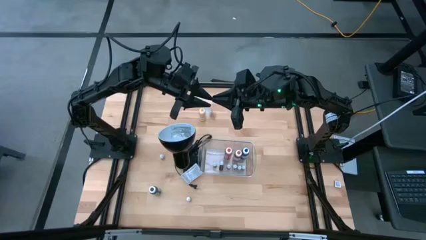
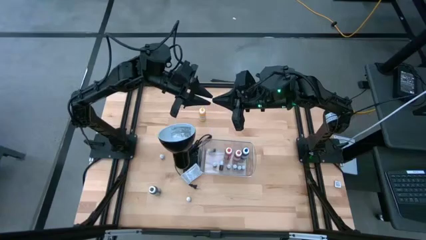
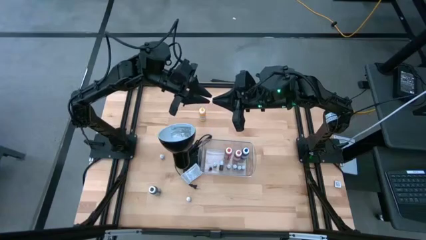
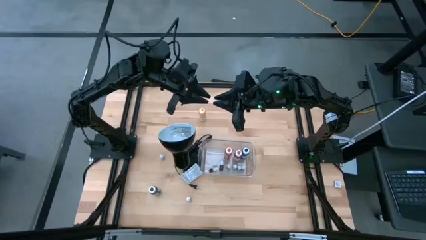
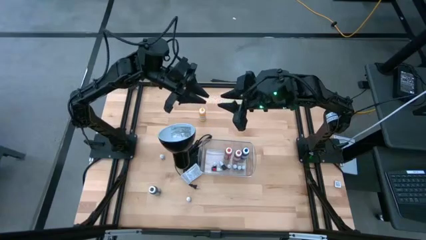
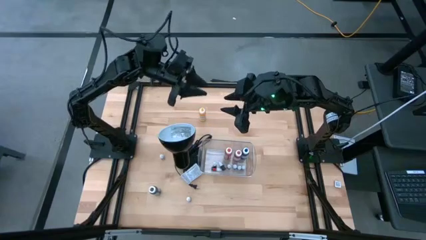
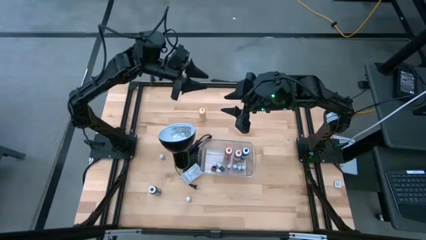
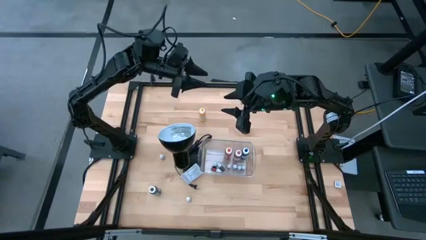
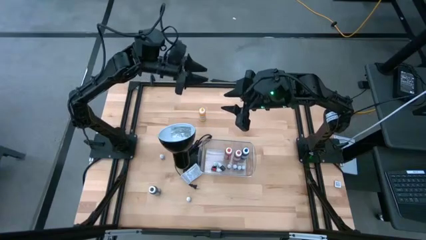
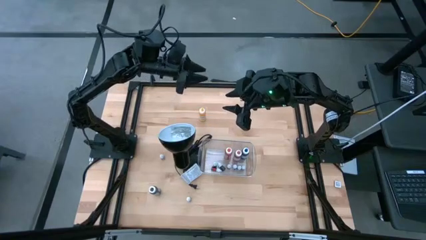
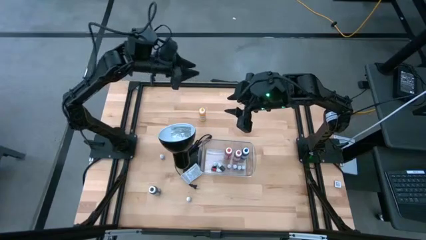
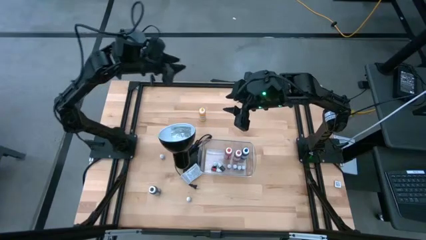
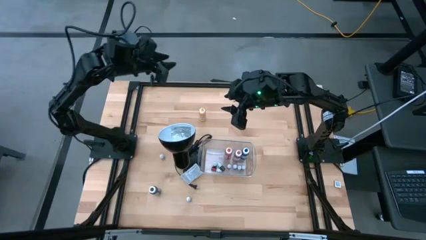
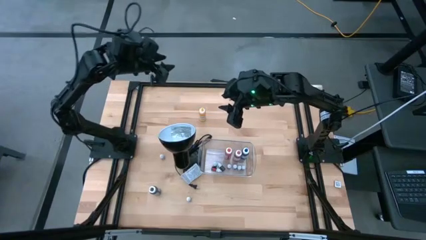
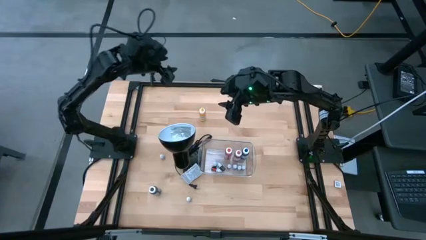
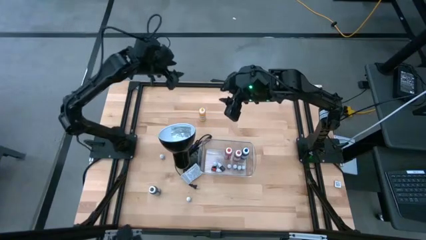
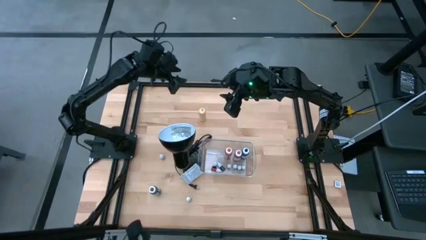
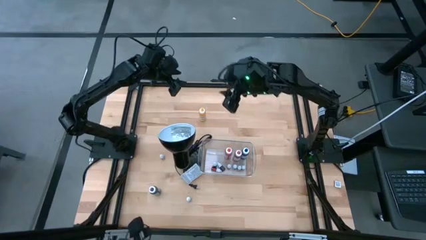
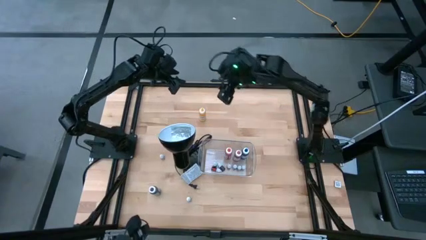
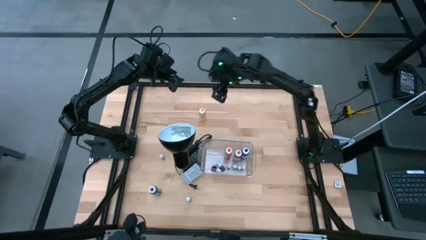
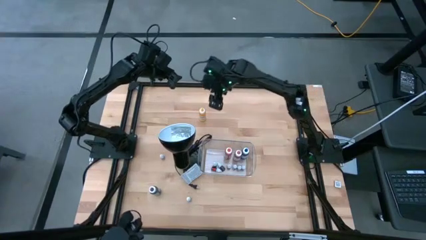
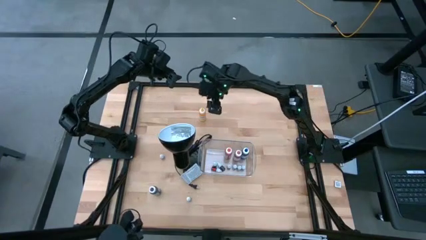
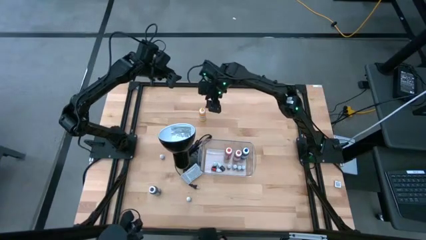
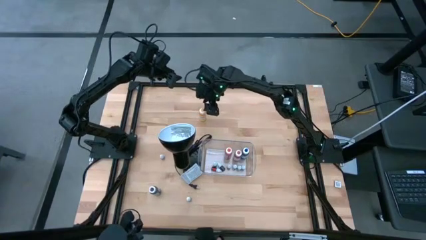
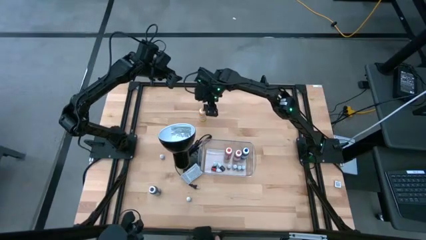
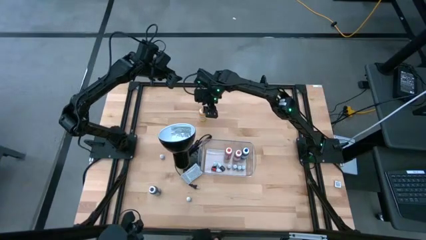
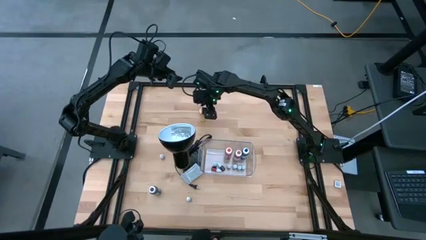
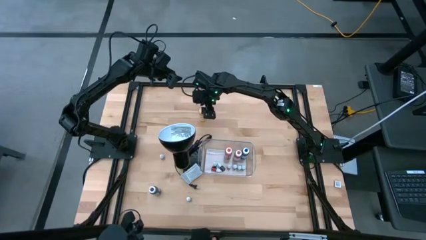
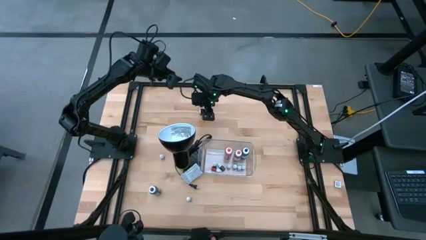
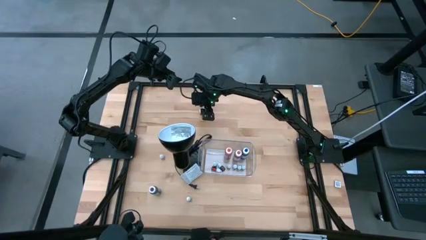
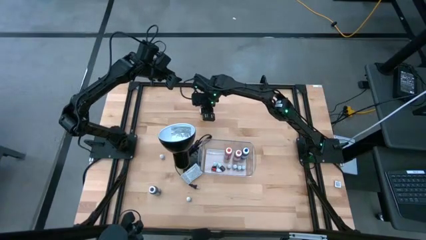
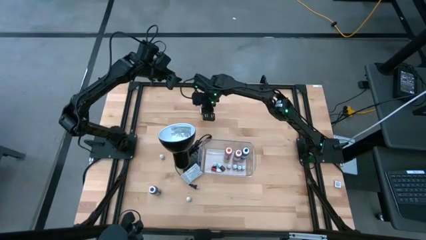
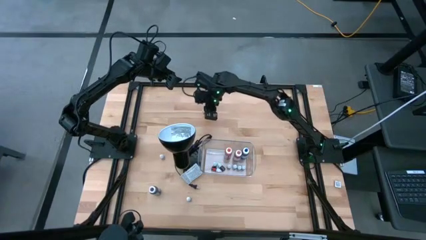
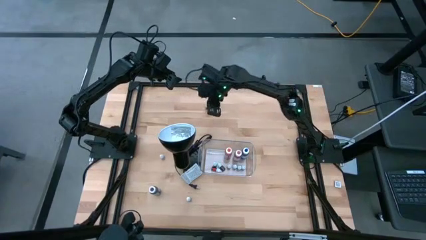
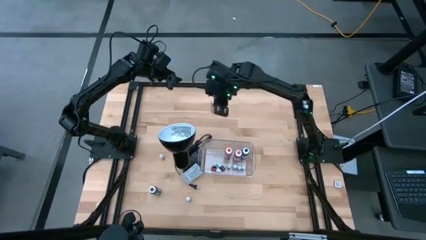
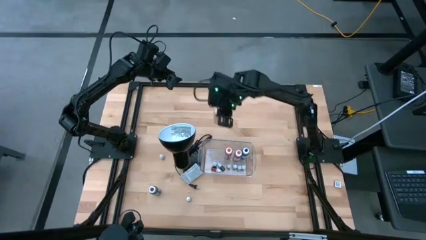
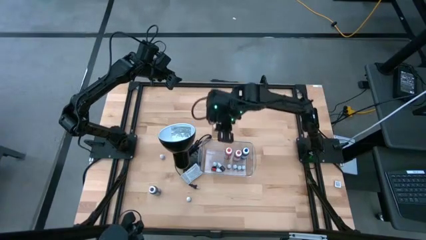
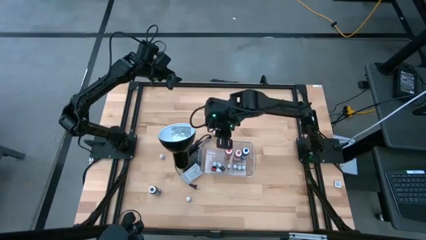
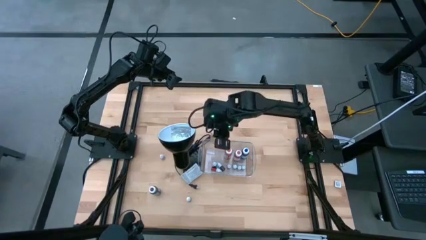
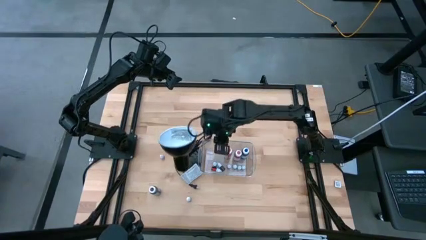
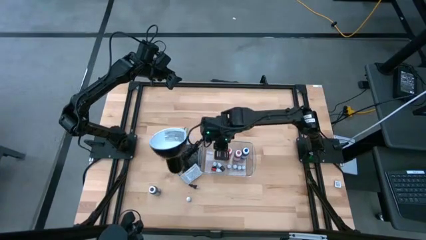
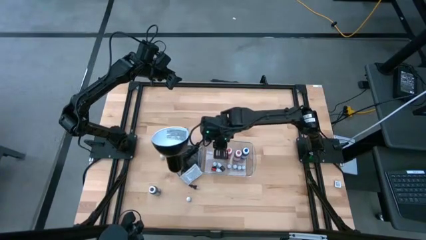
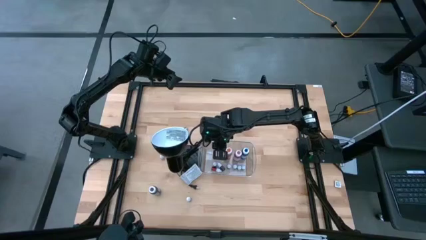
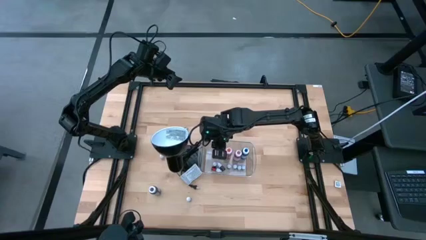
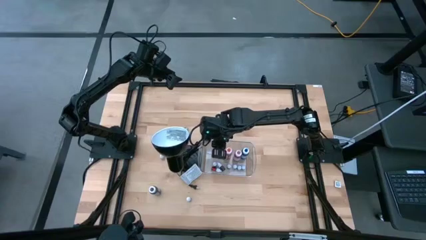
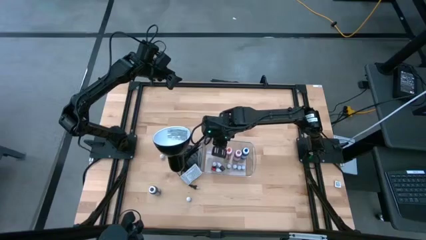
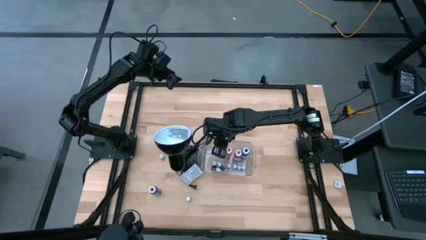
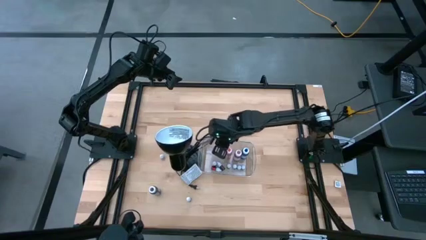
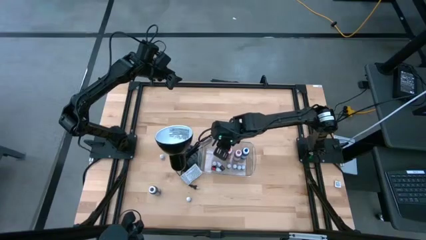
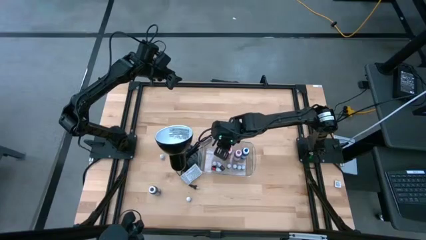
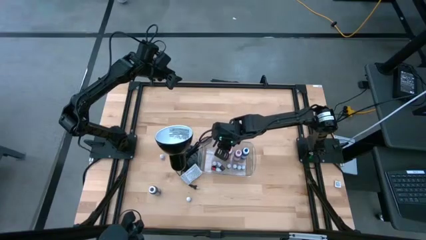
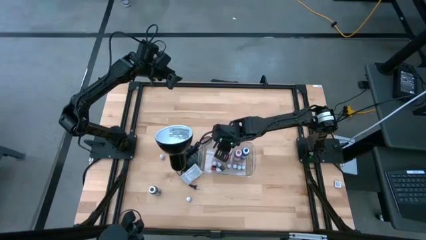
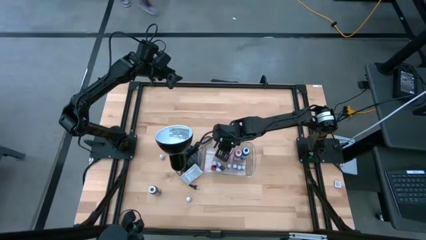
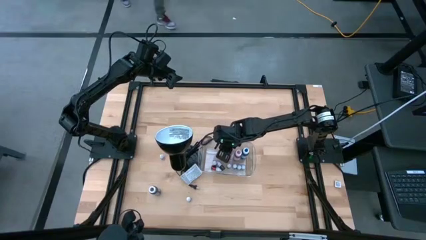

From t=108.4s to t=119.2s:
Task: Pick & Place food coloring
Put the big yellow food coloring bottle into the transparent bin
